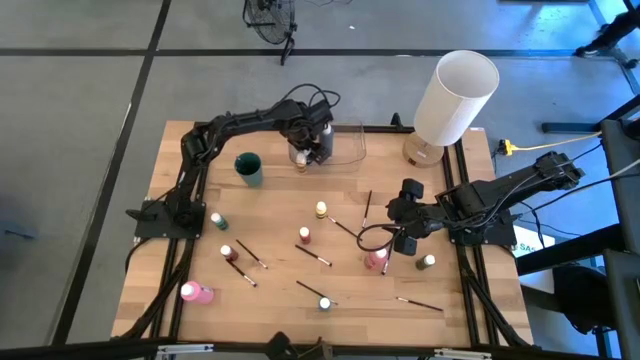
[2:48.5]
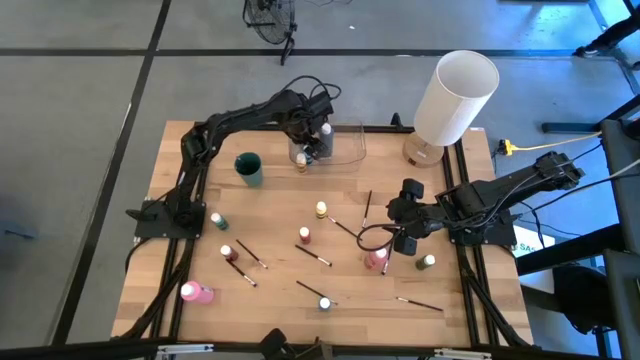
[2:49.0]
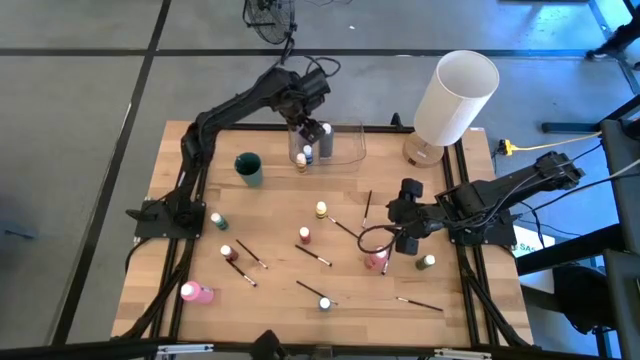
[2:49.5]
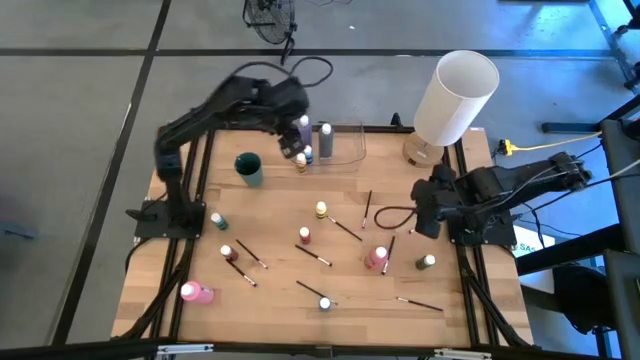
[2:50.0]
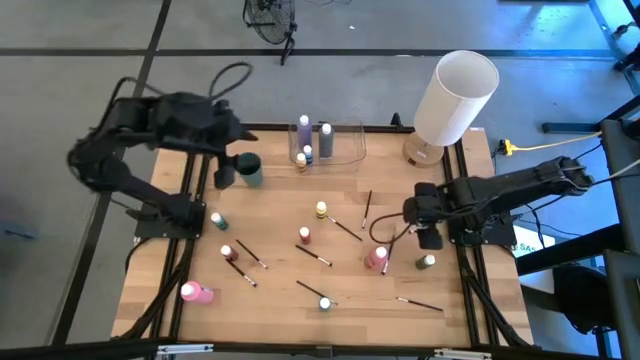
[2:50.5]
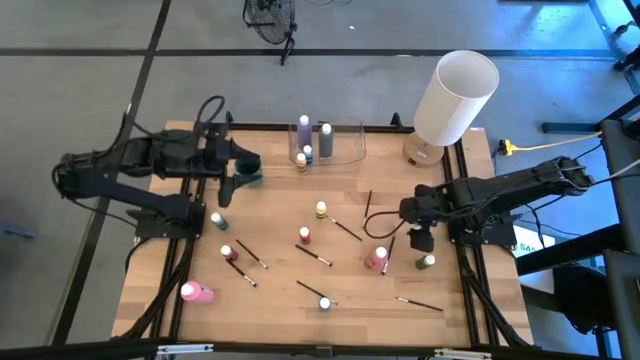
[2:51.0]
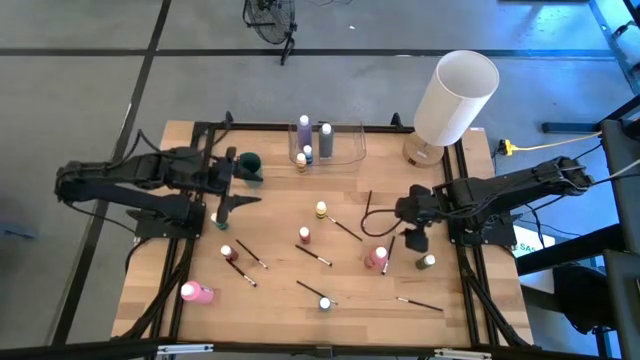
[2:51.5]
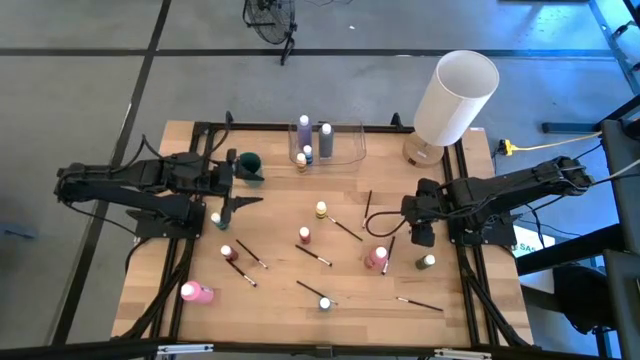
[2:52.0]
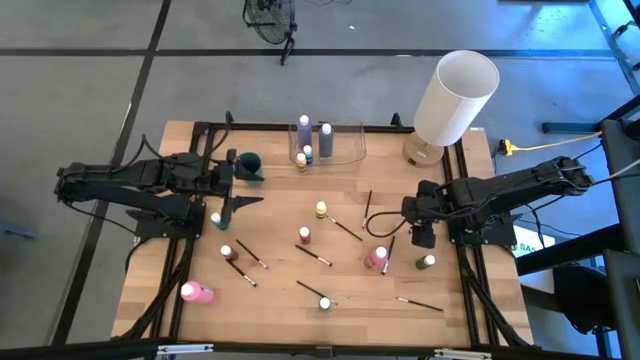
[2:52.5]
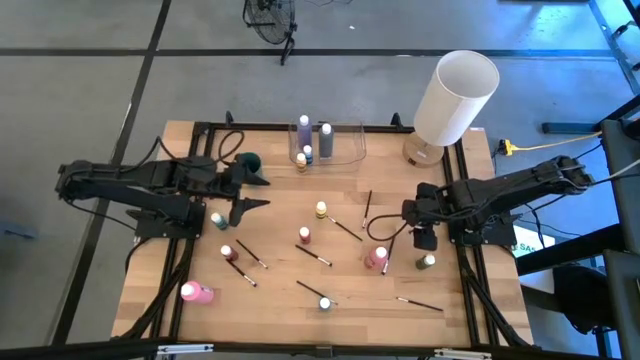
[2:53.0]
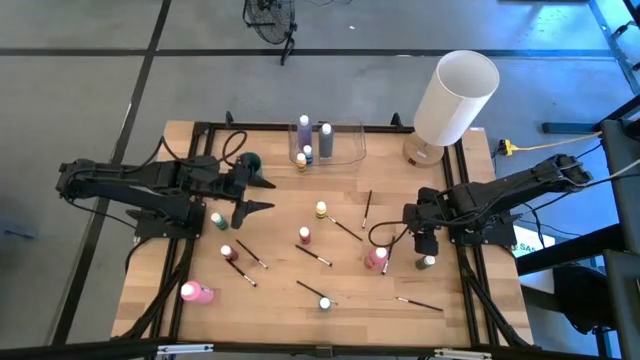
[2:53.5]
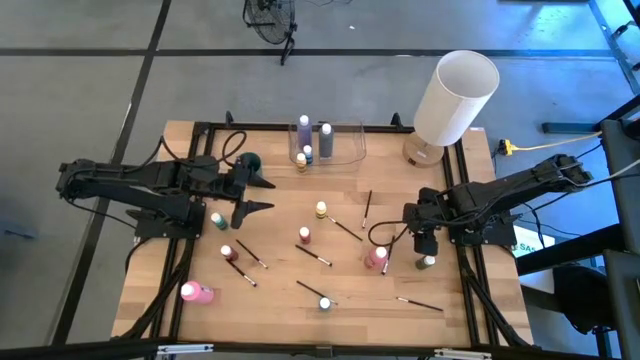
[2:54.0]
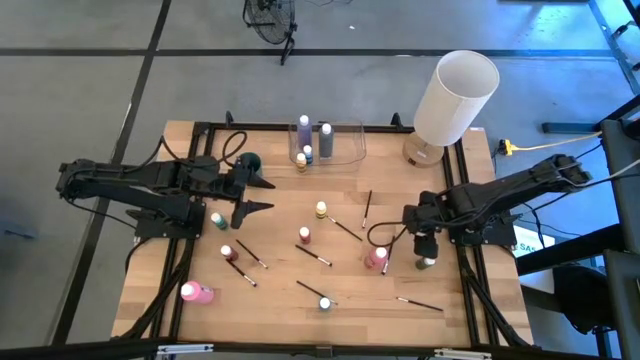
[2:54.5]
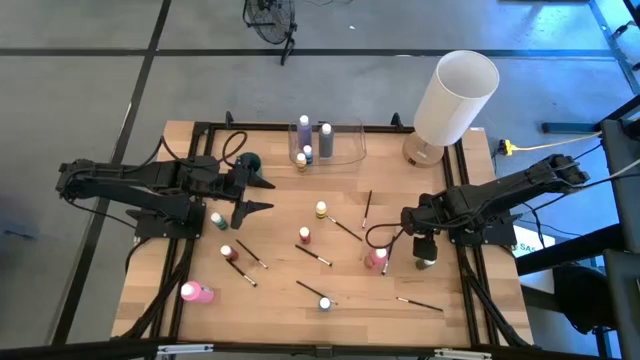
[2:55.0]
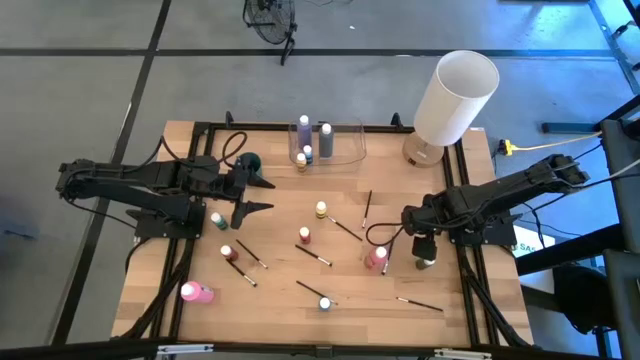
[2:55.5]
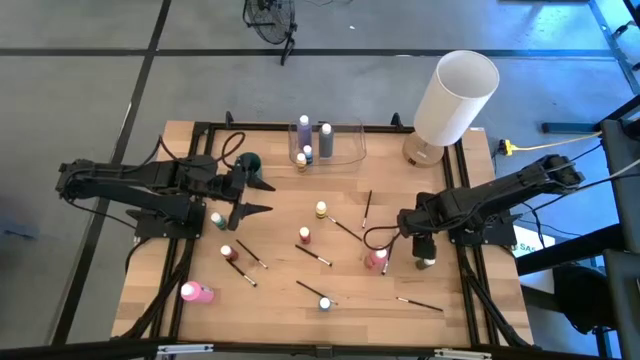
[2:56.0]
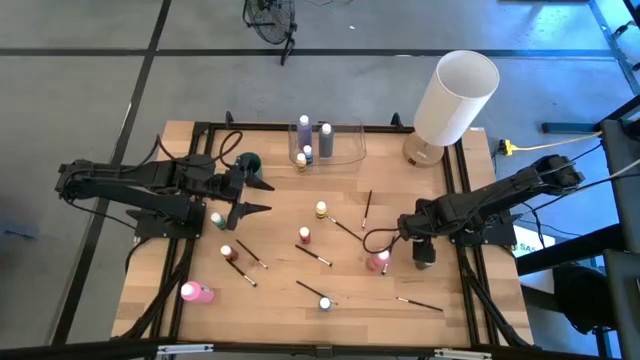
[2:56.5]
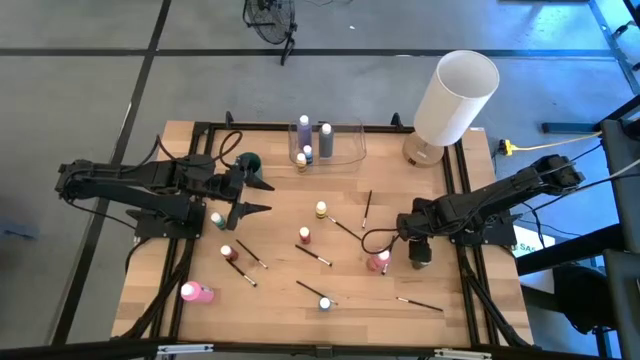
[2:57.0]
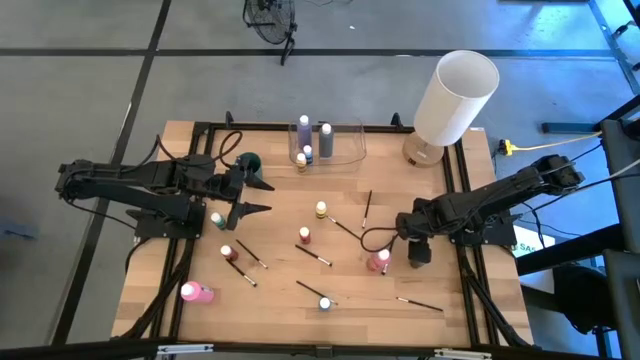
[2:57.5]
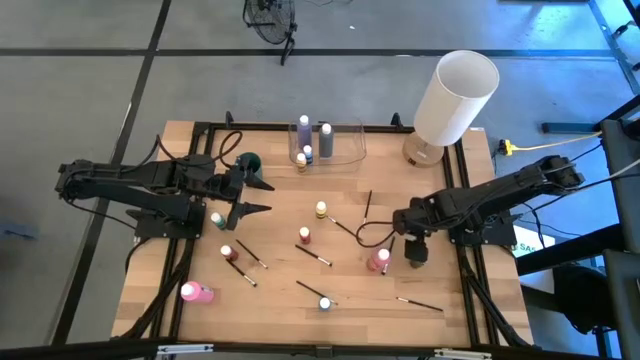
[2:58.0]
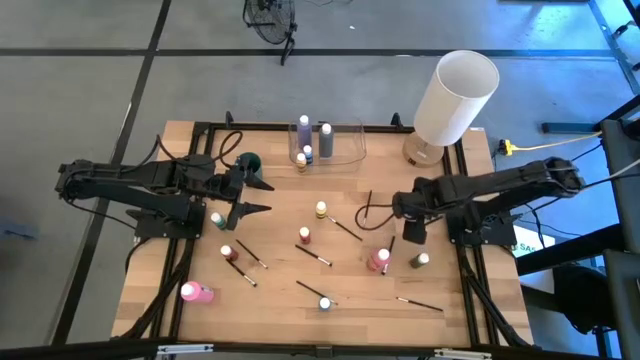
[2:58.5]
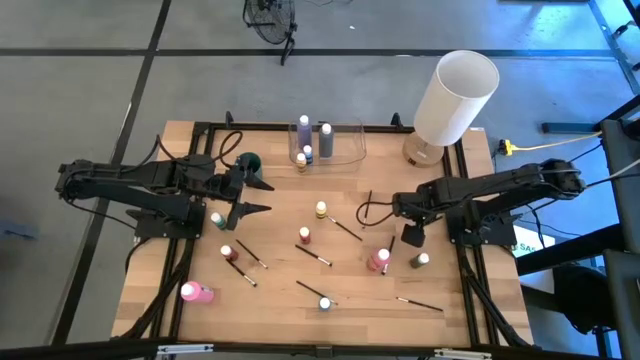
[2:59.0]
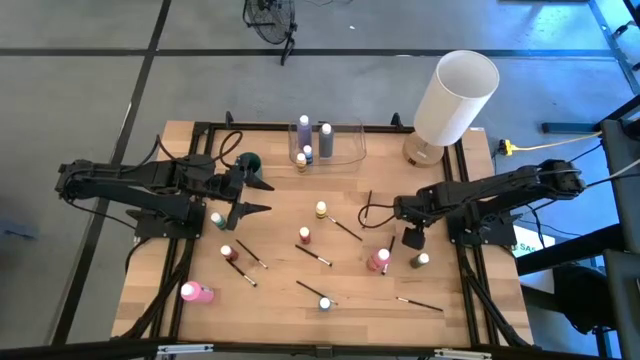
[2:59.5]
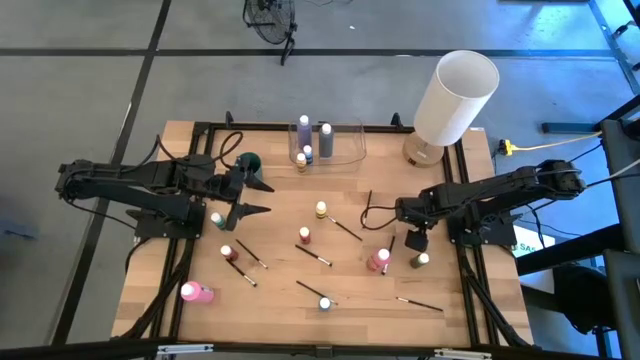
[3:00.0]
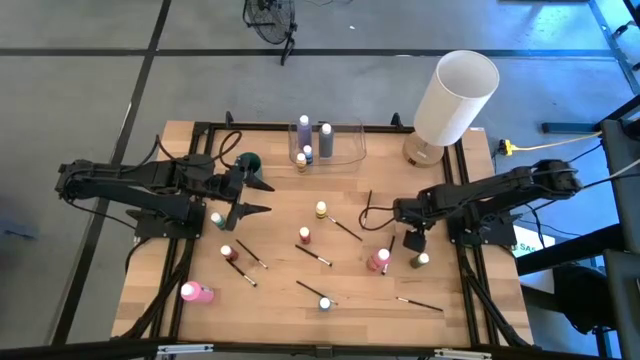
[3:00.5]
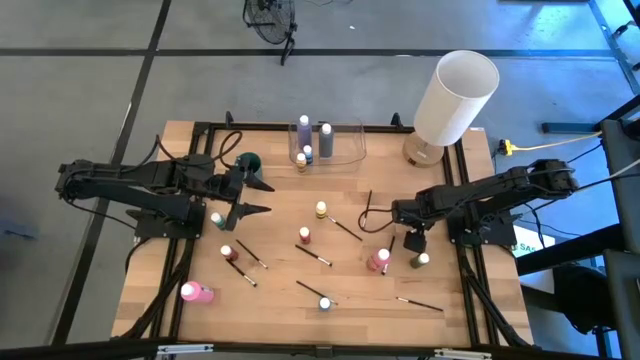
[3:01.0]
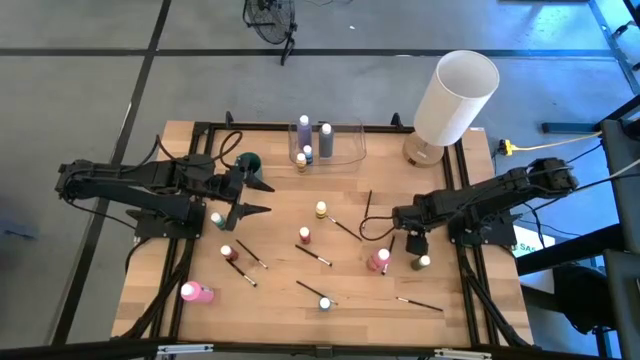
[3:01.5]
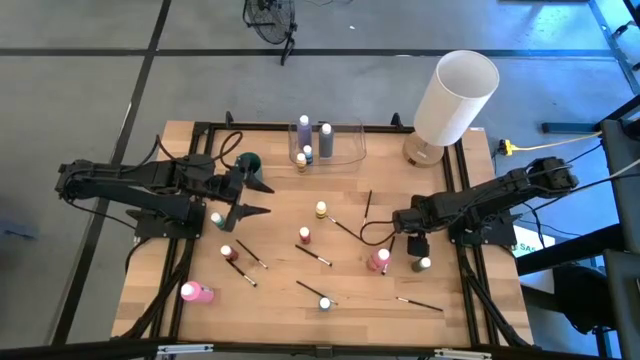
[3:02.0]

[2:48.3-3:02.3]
Task: Pick & Place Paint Supplies
Put the silver paint brush into the green cup

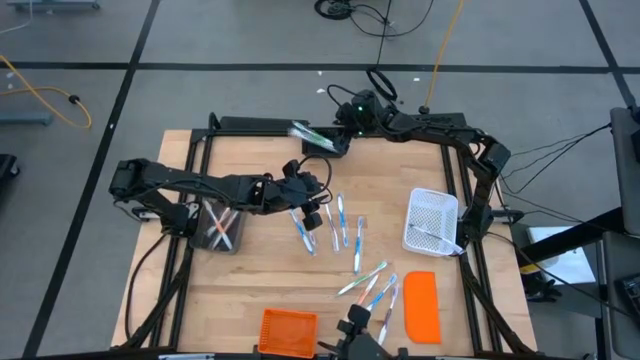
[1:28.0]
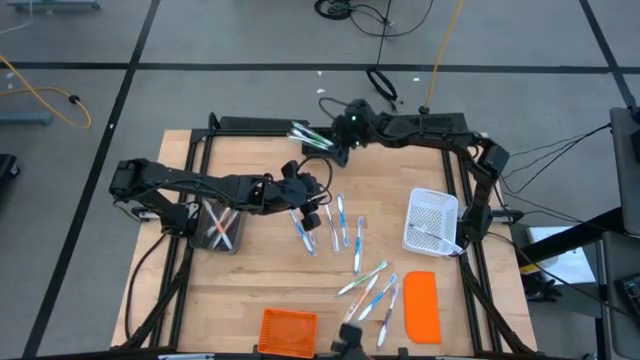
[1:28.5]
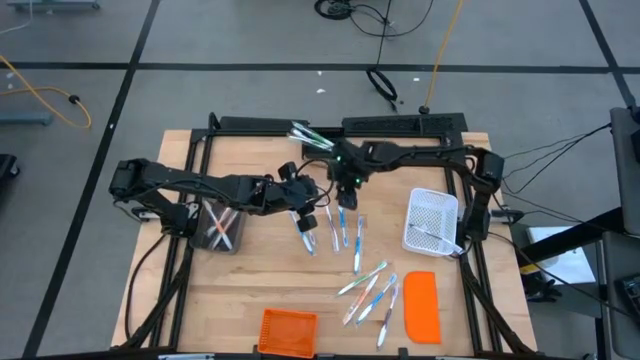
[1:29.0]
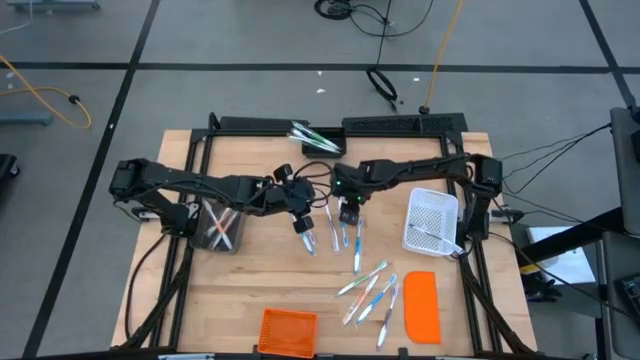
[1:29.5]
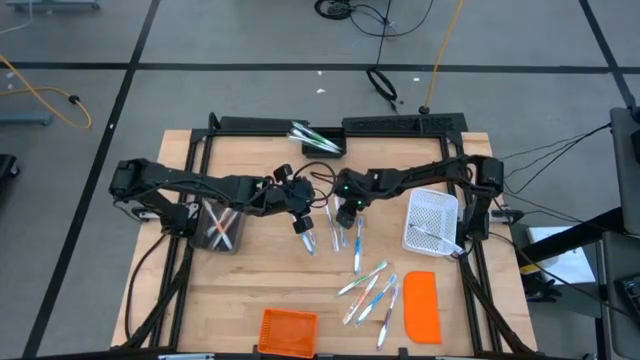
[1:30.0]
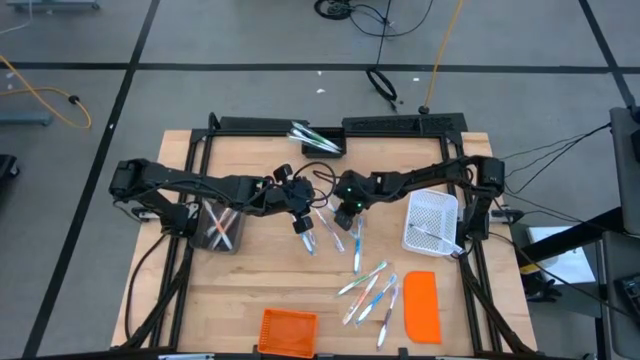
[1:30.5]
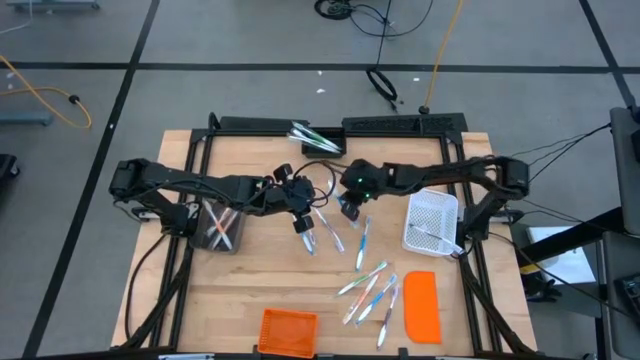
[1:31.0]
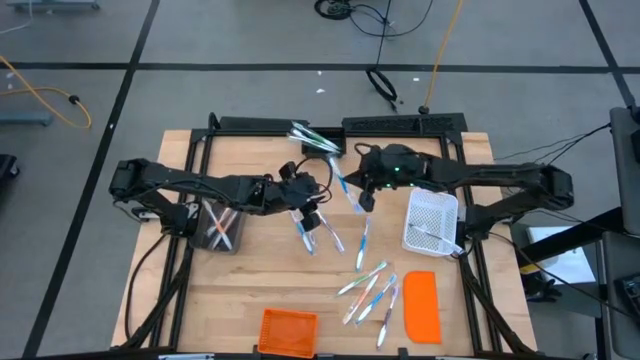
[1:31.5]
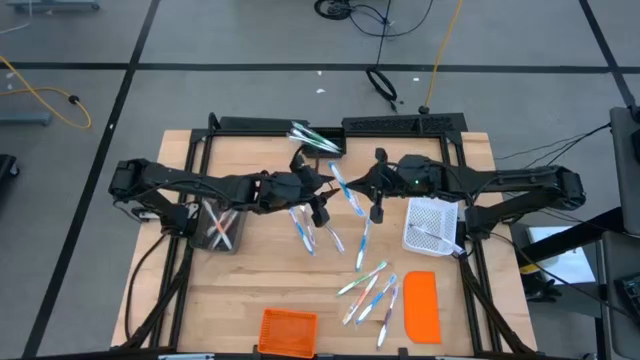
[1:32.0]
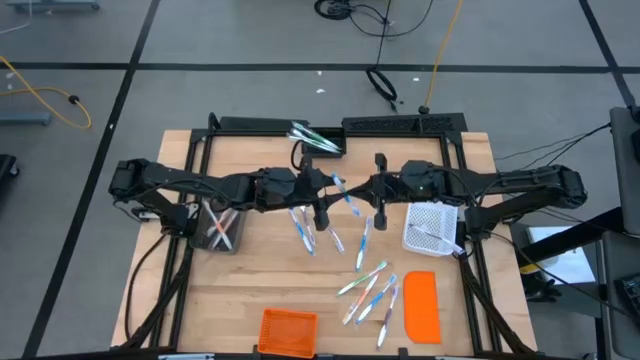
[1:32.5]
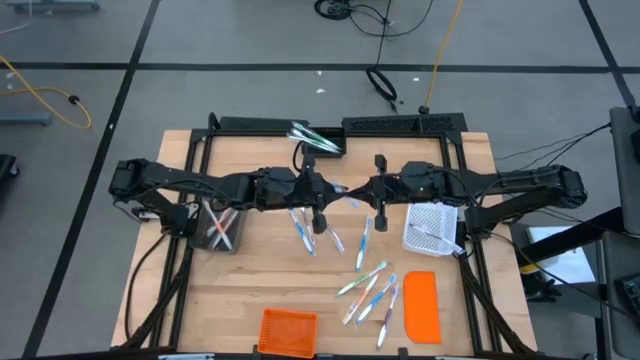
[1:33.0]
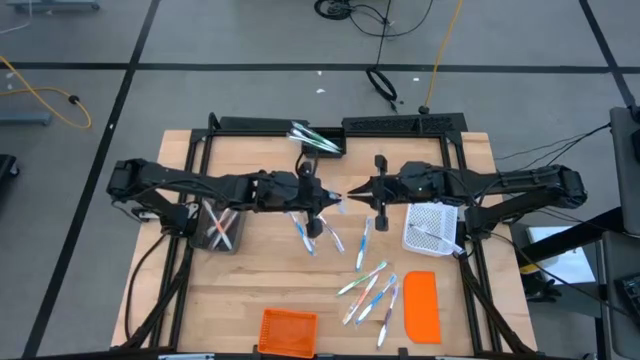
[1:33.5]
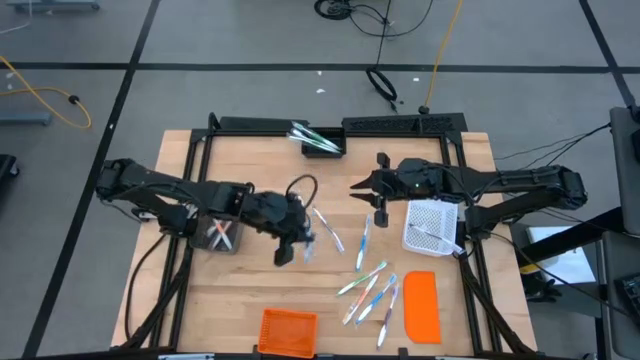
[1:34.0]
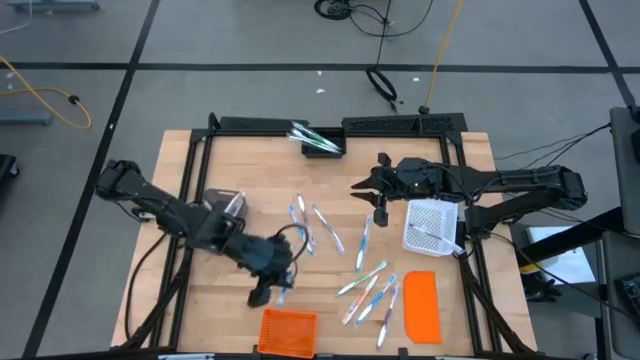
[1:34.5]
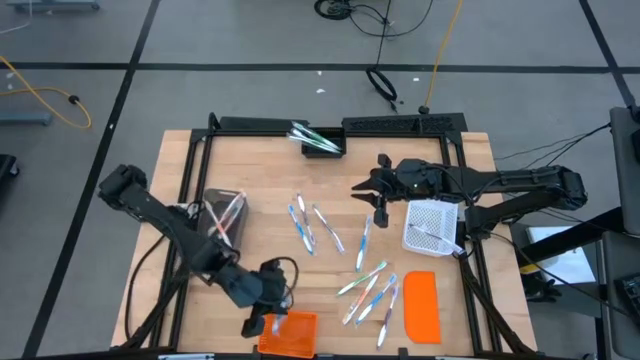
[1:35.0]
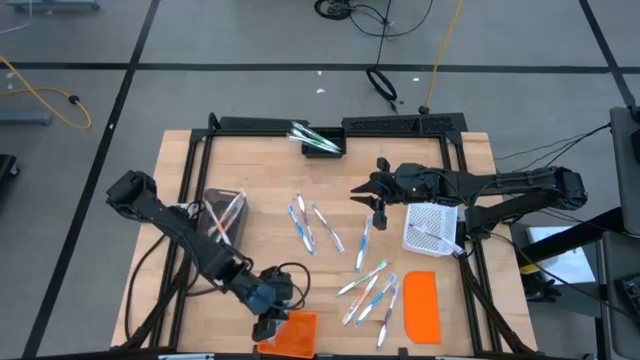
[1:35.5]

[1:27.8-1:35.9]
Task: Pick & Place Toothbrushes
Put the blue toothbrush into the orange bin

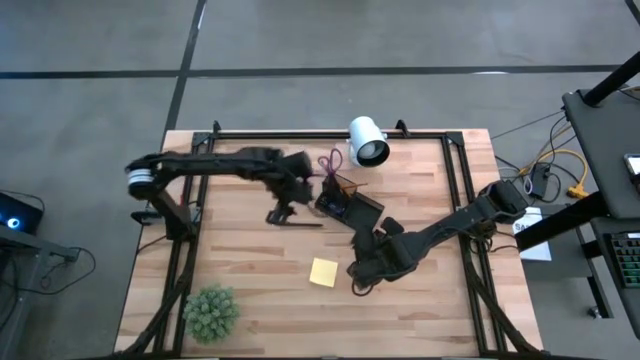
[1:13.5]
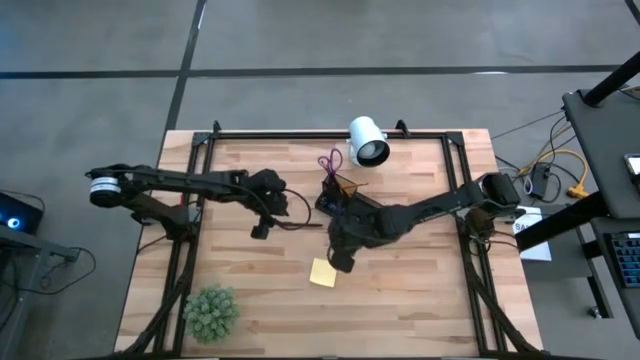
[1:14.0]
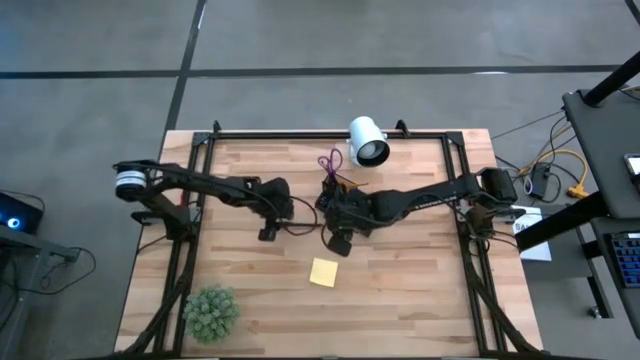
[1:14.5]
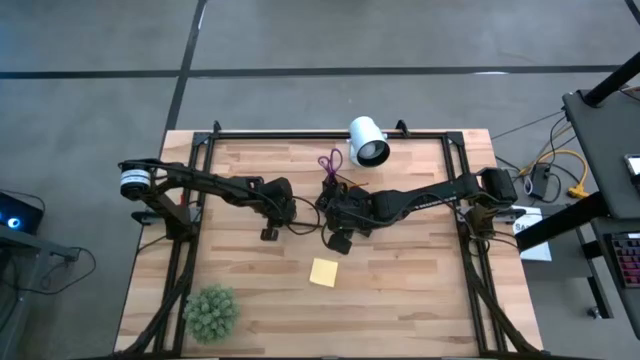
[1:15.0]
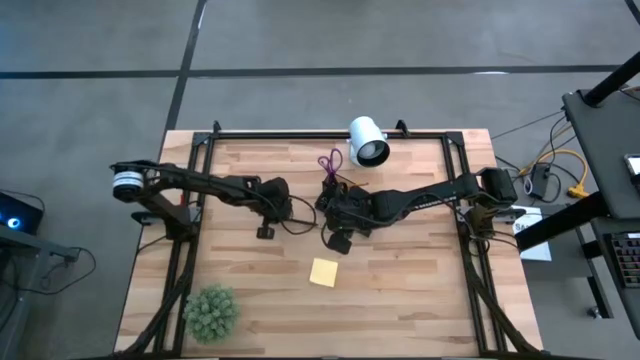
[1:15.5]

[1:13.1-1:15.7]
Task: Pick and place office supplies into organizer
Put the black pen into the black mesh organizer
